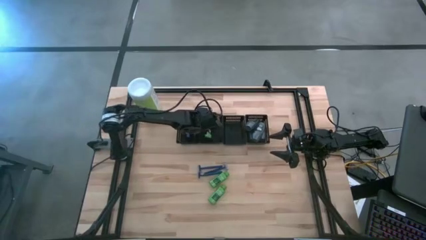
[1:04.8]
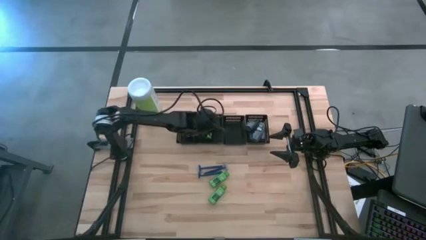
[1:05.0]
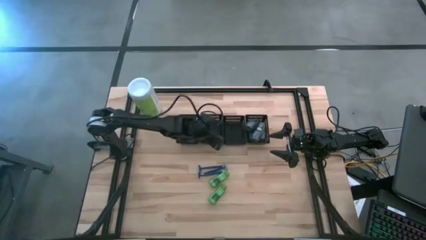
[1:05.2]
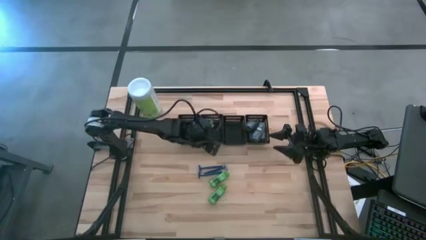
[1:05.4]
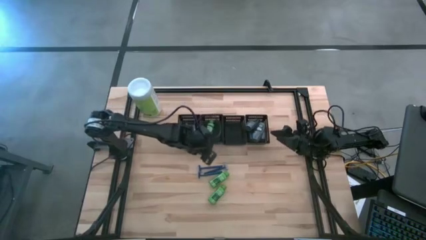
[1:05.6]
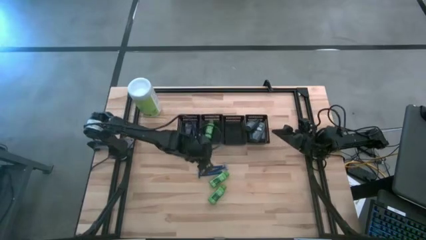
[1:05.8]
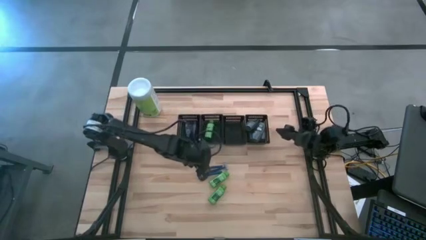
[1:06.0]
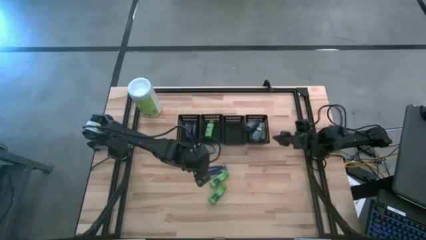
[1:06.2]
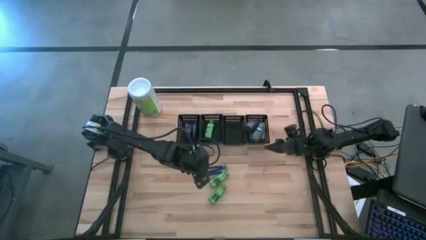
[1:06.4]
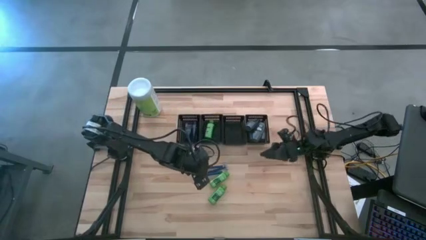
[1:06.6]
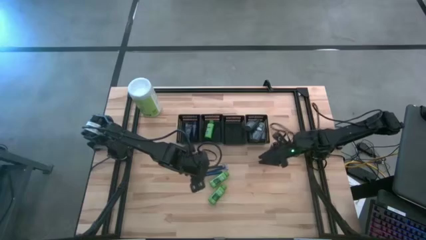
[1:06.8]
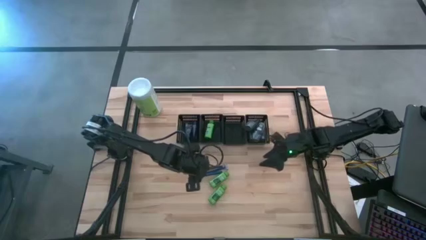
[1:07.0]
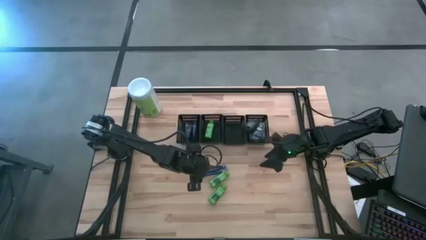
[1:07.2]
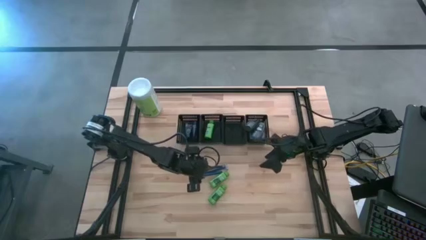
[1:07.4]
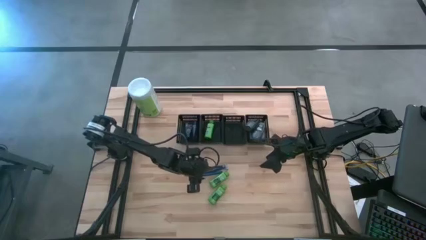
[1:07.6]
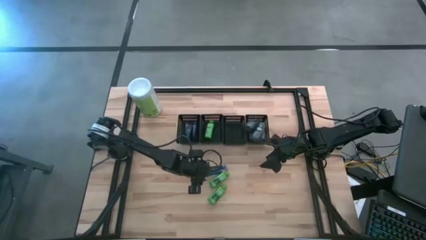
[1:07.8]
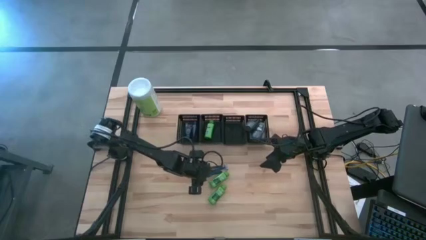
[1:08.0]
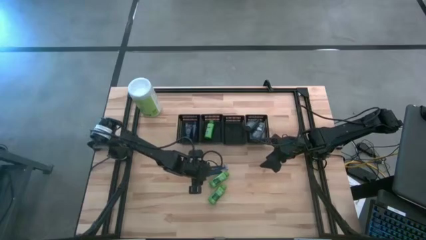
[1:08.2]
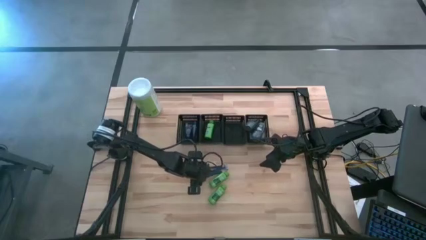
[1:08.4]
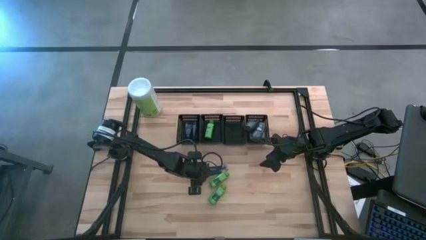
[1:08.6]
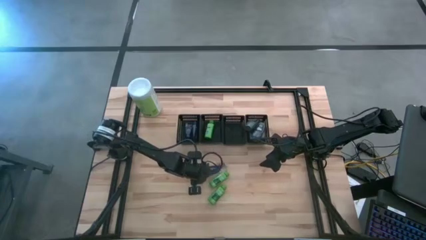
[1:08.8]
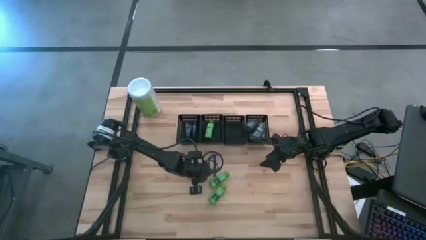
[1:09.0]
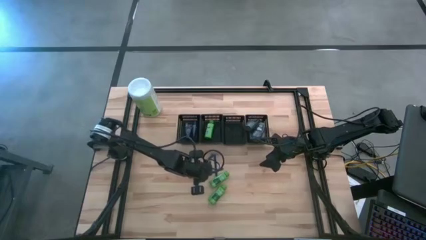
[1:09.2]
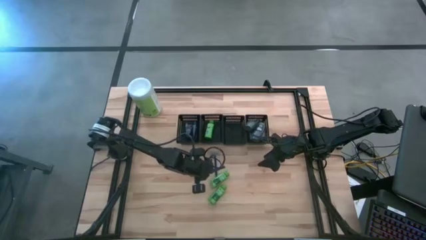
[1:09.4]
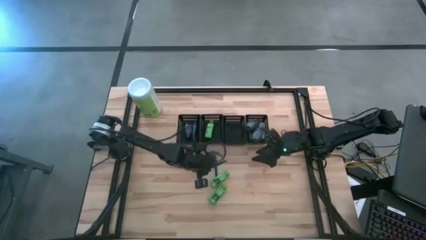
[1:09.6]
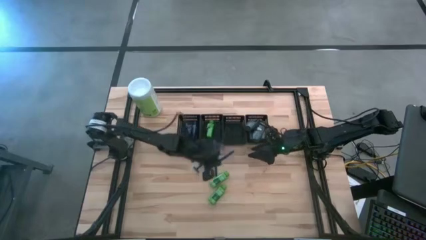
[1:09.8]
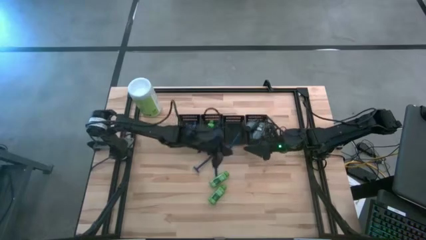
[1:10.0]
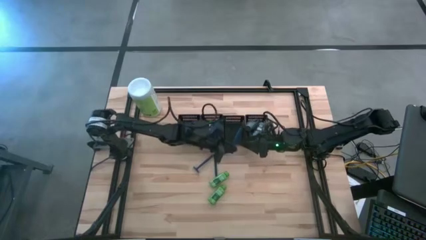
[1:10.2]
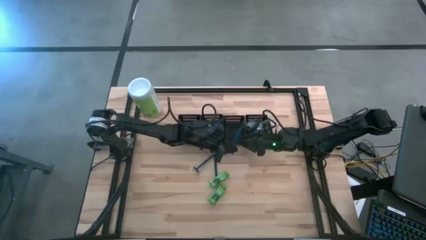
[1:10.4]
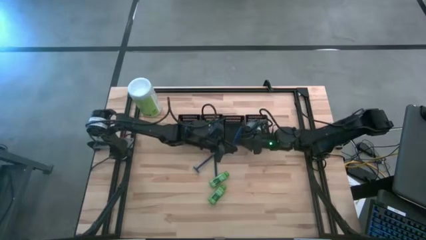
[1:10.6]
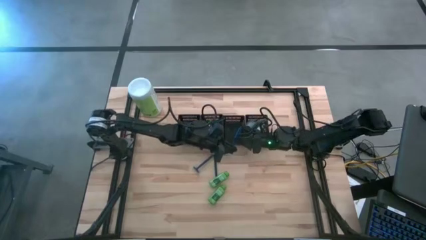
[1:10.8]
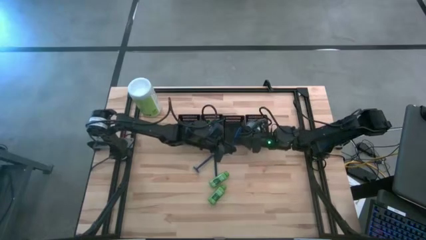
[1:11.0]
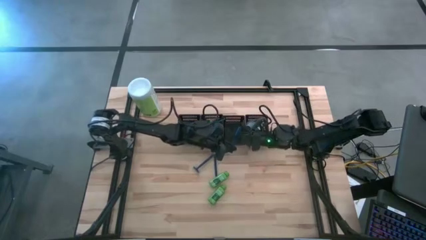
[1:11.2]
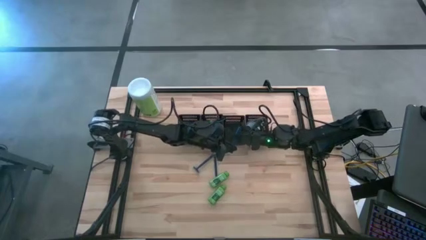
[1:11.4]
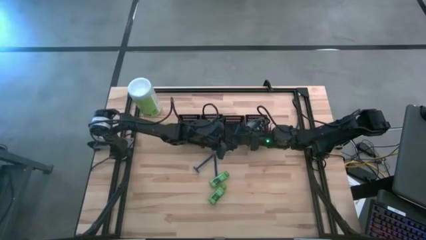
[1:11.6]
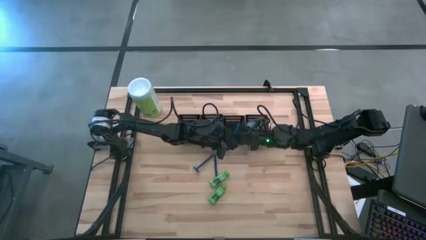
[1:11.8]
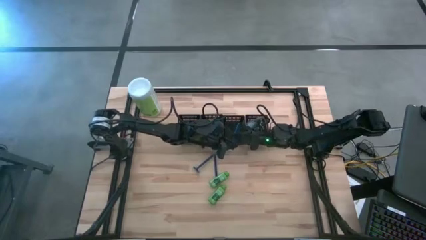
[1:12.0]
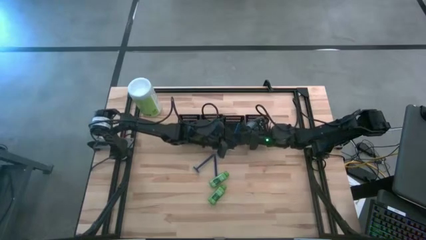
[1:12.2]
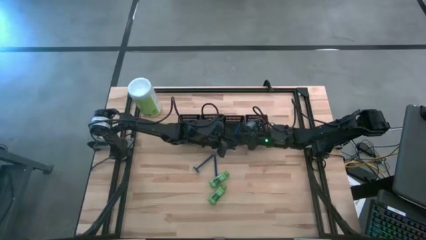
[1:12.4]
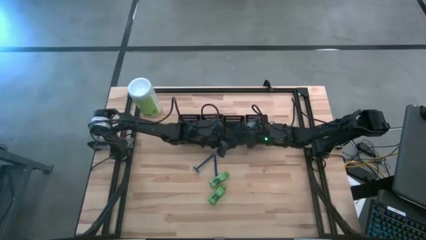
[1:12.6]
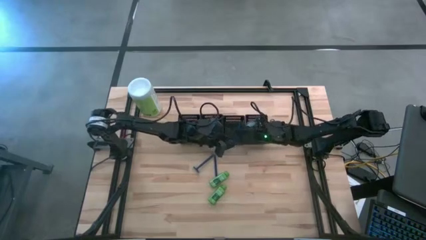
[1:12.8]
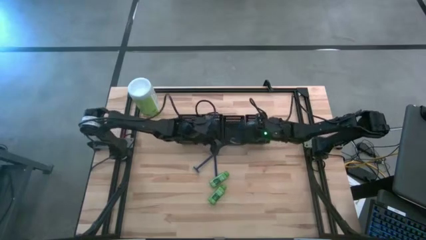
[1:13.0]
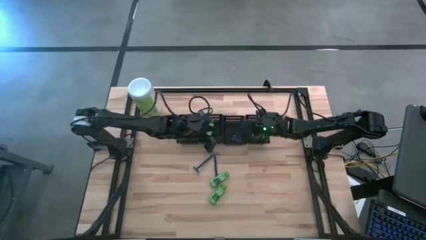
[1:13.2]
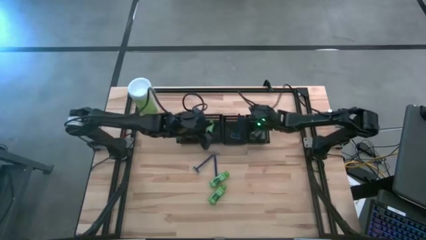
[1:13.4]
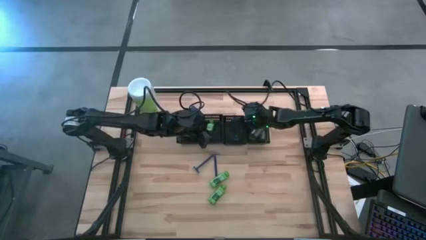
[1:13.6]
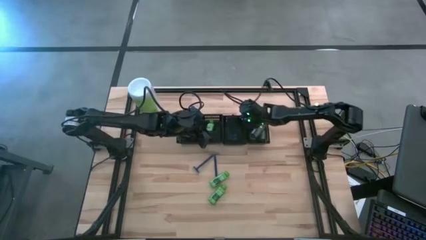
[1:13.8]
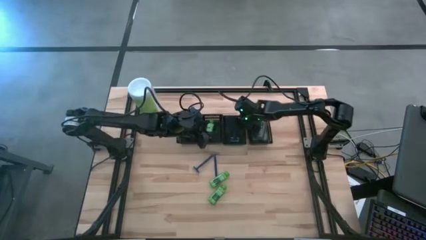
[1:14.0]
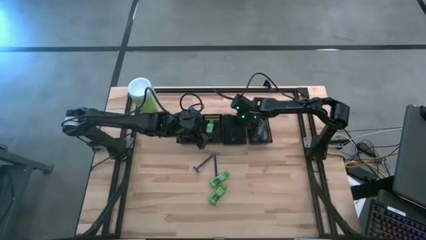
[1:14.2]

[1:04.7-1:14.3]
Task: Pick & Place Travel size toiletries
Put the blue razor into the middle right black bin

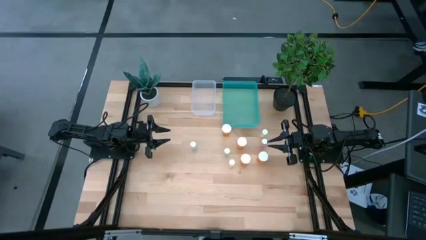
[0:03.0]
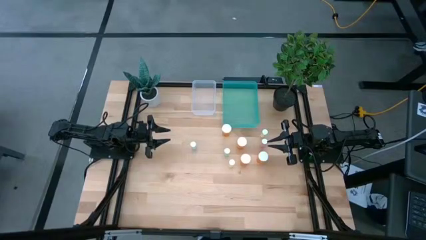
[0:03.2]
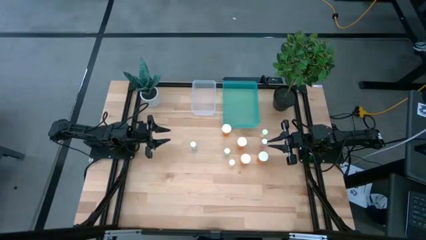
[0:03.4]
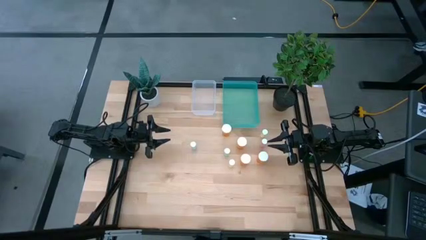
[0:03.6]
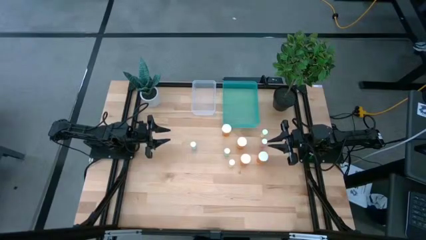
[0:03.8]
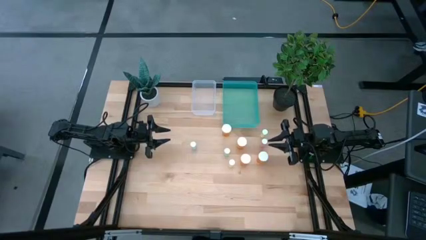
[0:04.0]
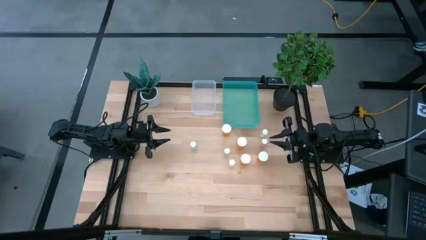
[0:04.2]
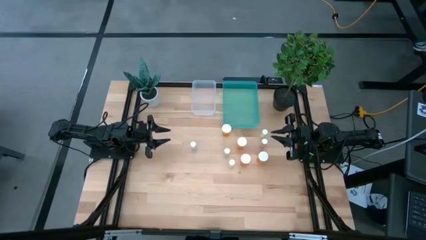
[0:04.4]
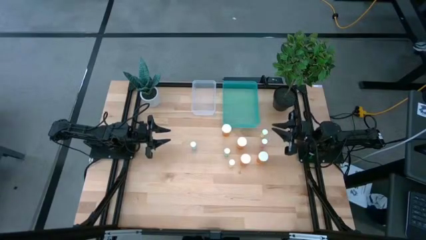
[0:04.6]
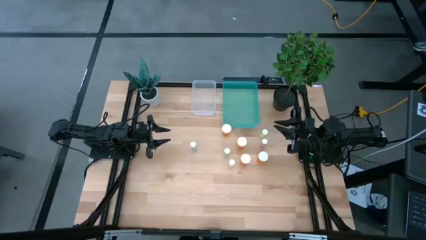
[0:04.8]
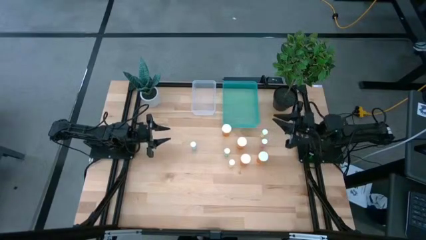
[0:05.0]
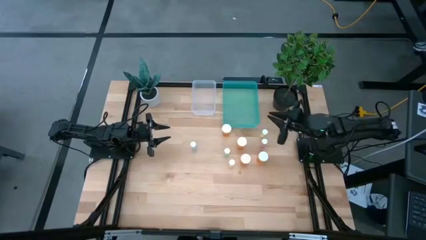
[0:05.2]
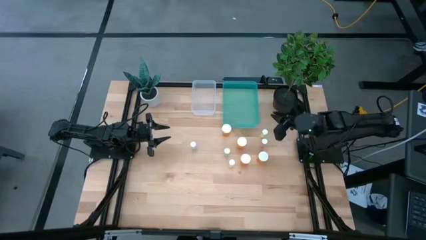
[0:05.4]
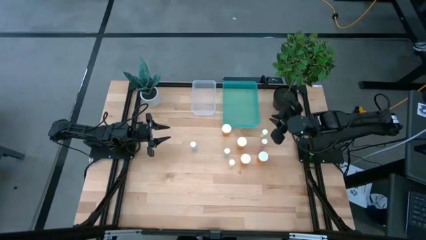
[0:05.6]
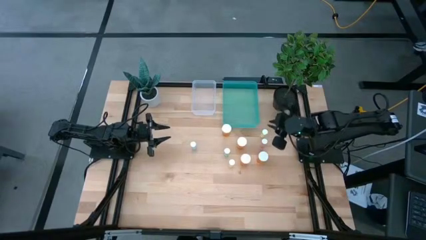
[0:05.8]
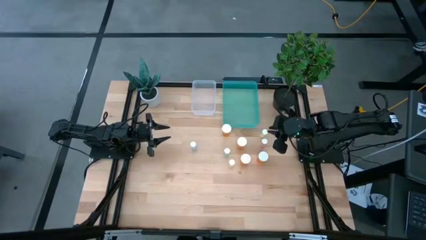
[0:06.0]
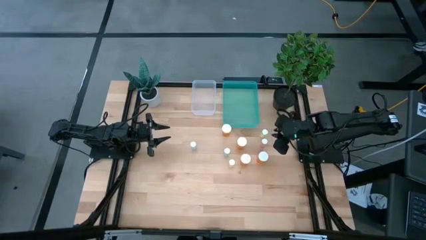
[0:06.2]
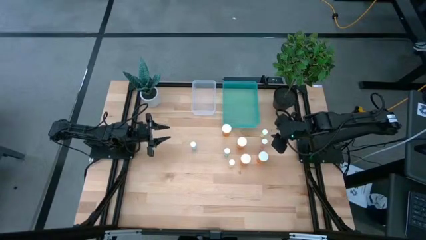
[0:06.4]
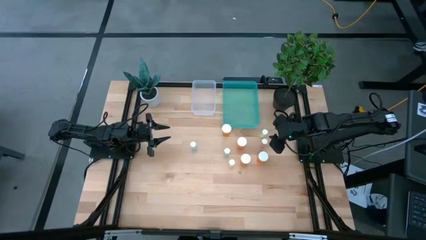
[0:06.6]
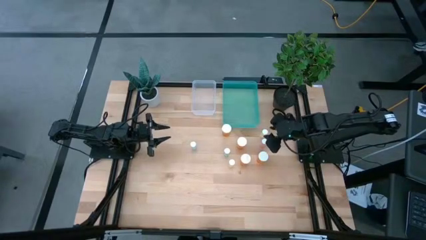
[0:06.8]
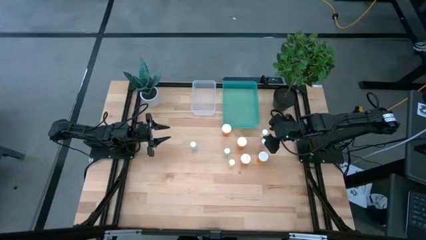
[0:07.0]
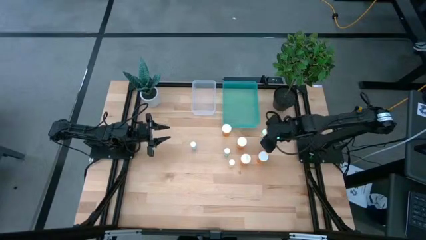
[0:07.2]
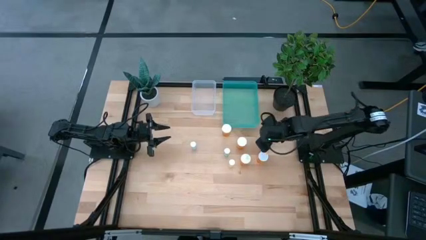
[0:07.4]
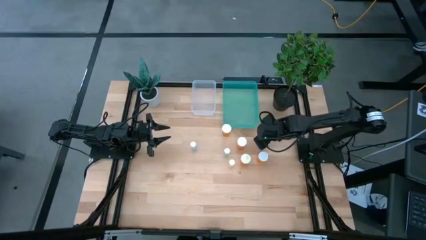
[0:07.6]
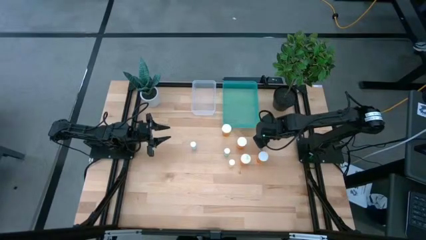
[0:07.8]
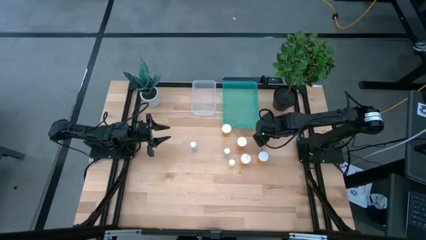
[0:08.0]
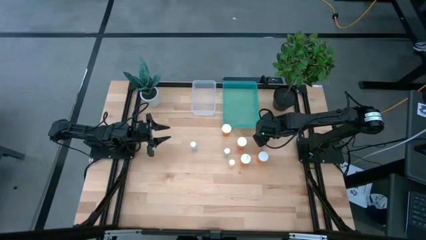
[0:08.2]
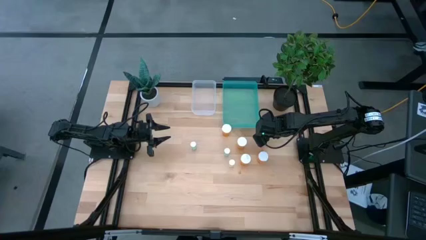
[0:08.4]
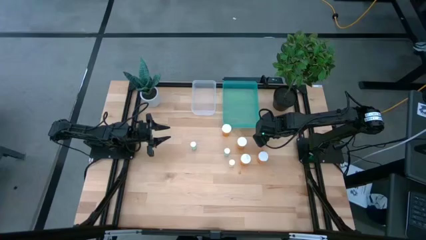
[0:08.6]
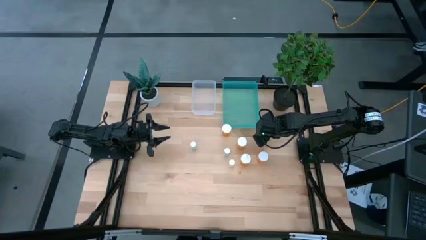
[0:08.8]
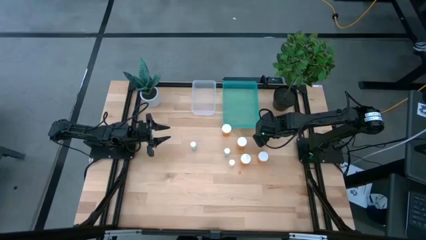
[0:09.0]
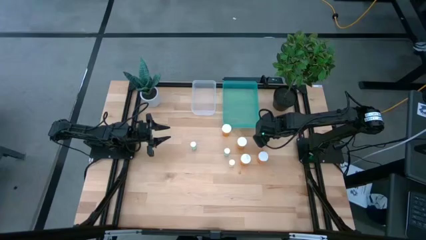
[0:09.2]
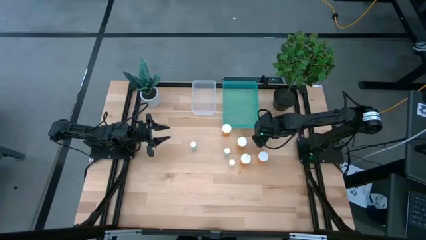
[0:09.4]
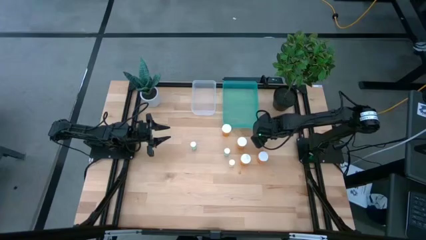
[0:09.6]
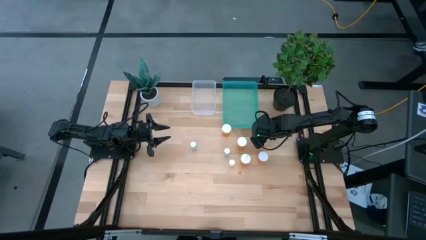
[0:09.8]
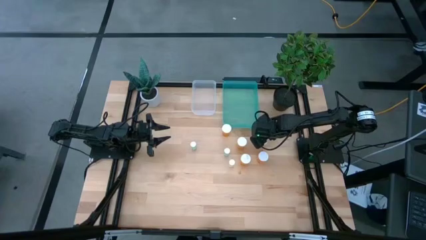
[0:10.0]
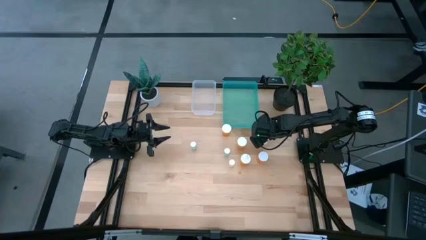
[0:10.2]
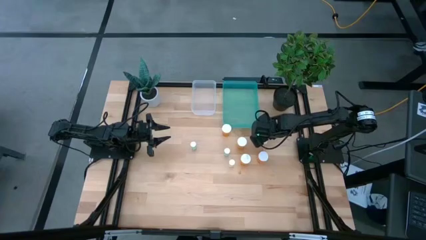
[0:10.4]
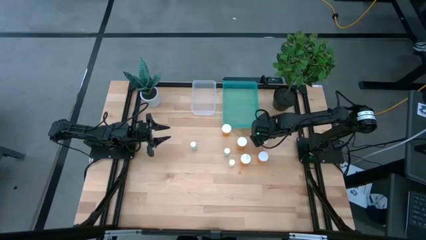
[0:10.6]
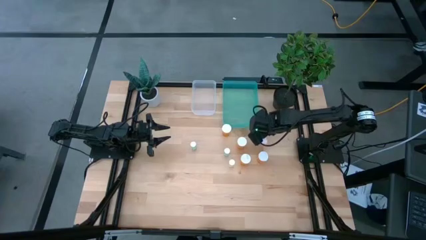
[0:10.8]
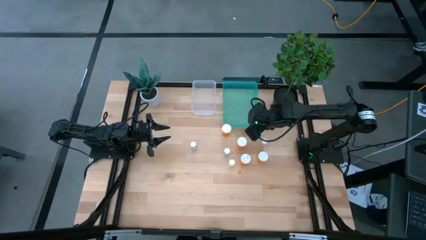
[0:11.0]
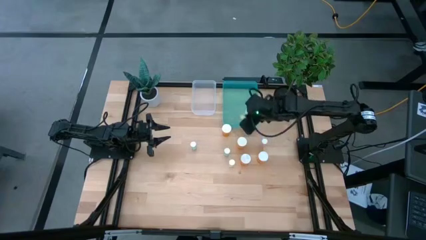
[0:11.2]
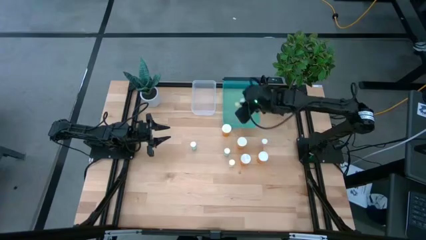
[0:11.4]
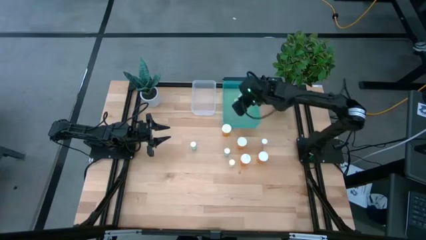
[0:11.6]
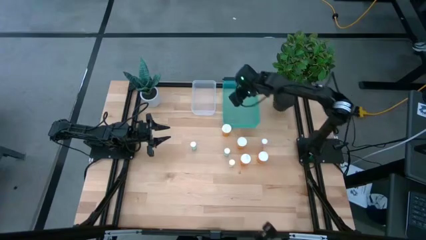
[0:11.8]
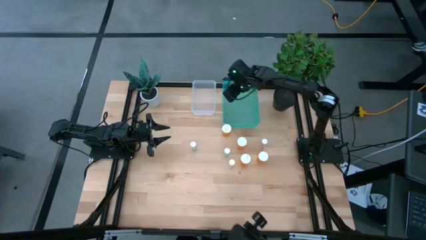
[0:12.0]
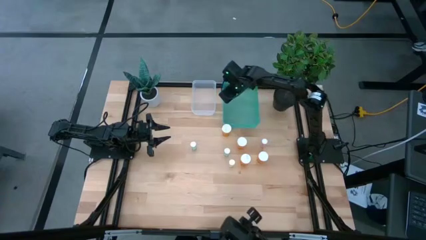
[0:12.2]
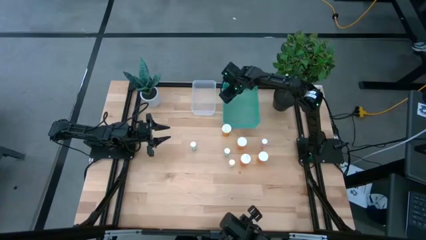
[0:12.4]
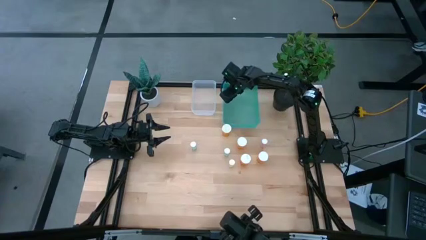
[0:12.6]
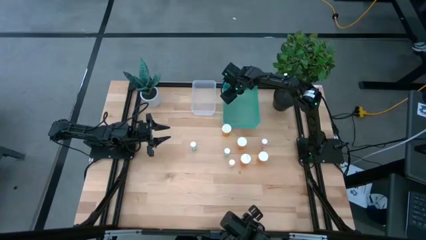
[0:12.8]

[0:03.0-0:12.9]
Task: Pick and place medicine bottles into bin by pill shape (circle, oval)
Put the yellow tablet bottle into the blue bin
